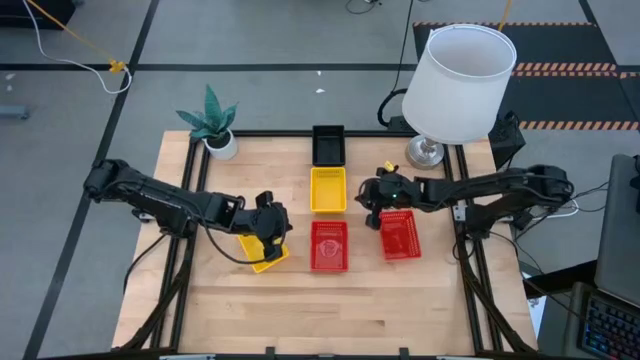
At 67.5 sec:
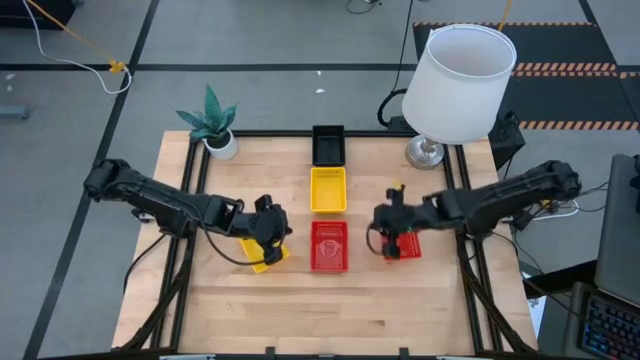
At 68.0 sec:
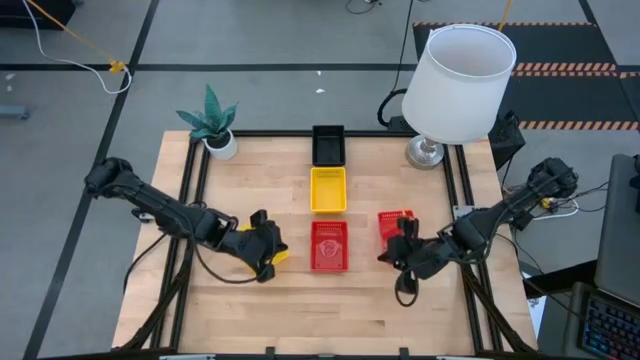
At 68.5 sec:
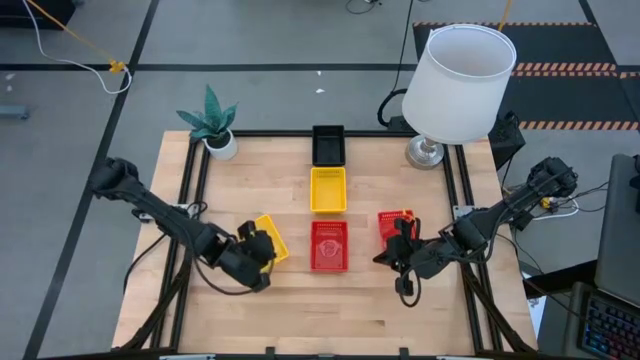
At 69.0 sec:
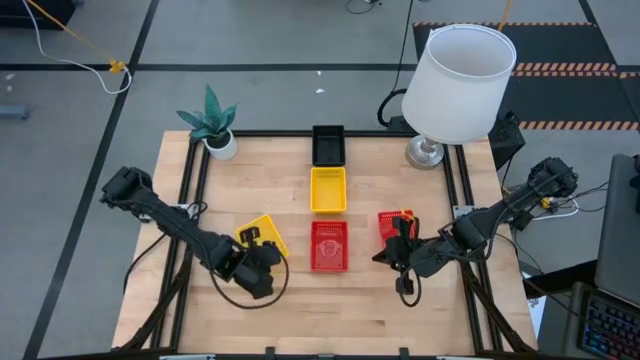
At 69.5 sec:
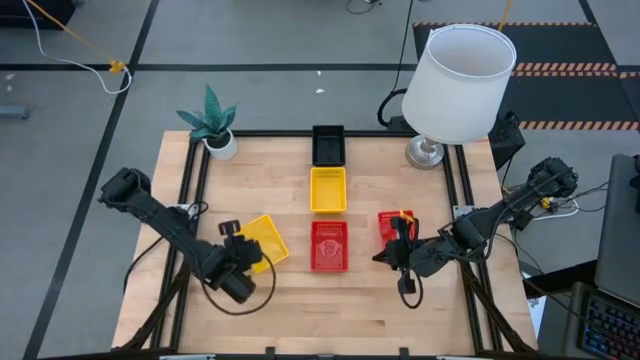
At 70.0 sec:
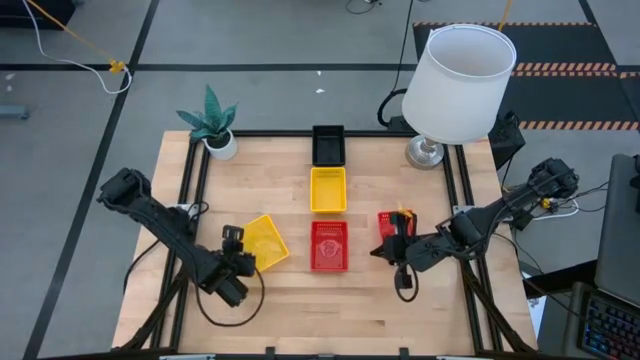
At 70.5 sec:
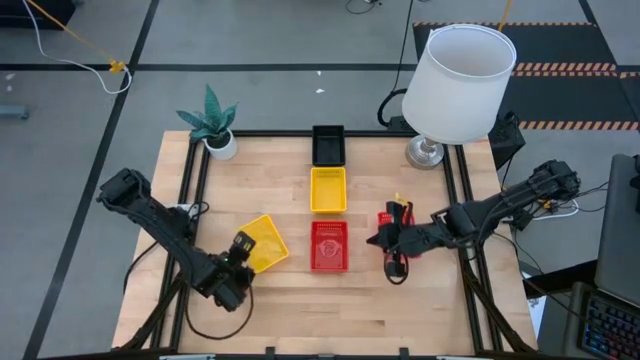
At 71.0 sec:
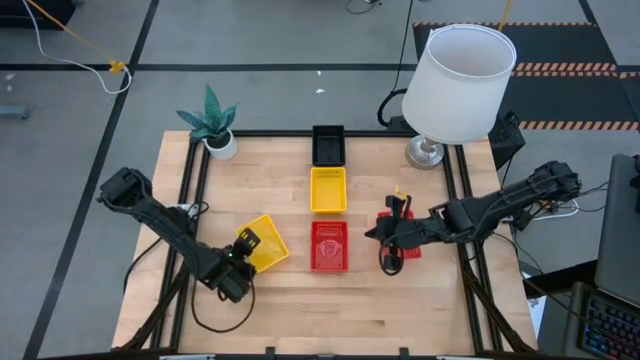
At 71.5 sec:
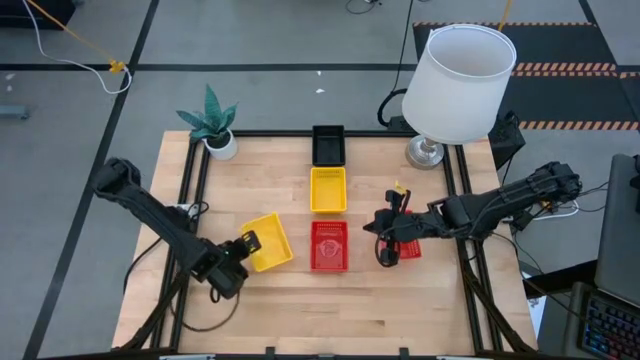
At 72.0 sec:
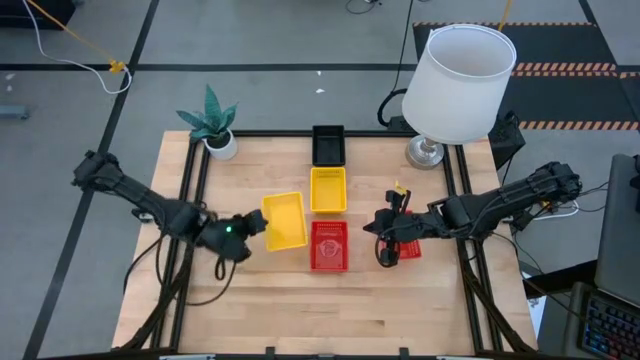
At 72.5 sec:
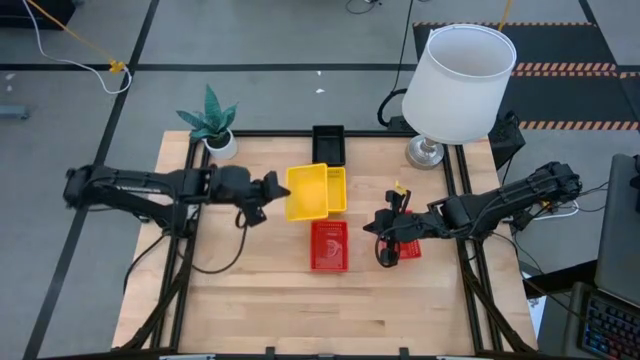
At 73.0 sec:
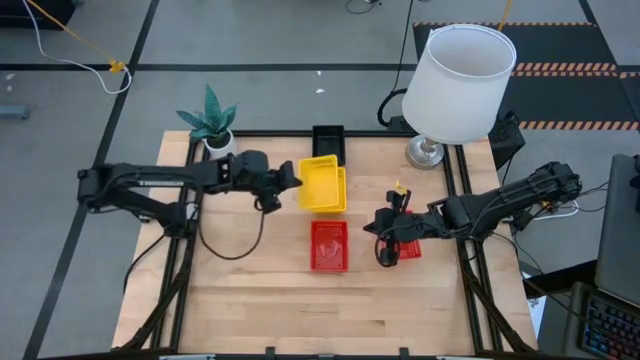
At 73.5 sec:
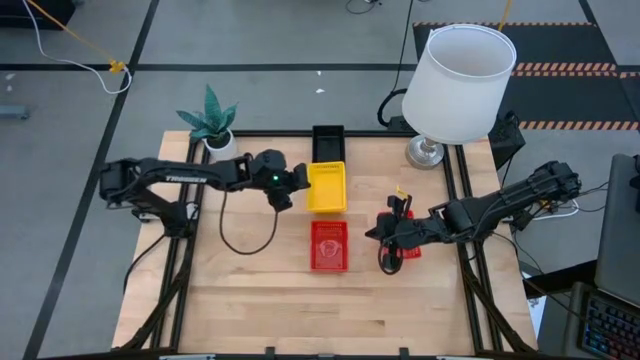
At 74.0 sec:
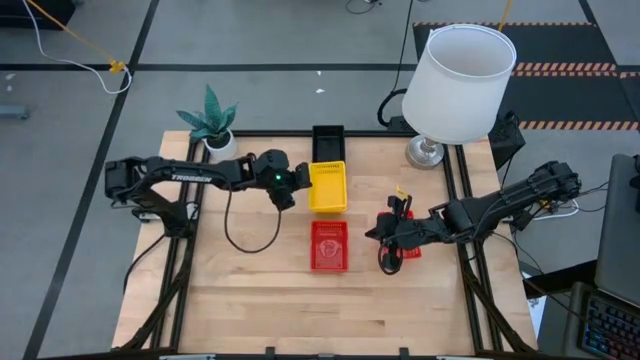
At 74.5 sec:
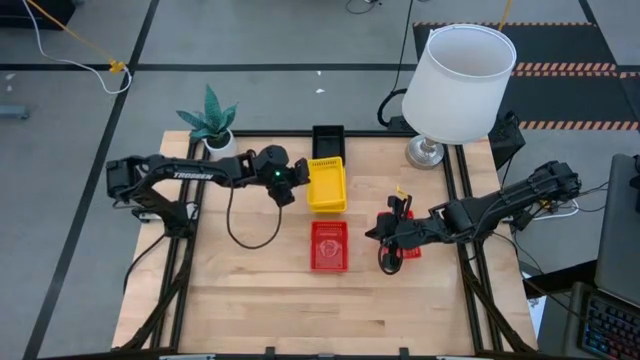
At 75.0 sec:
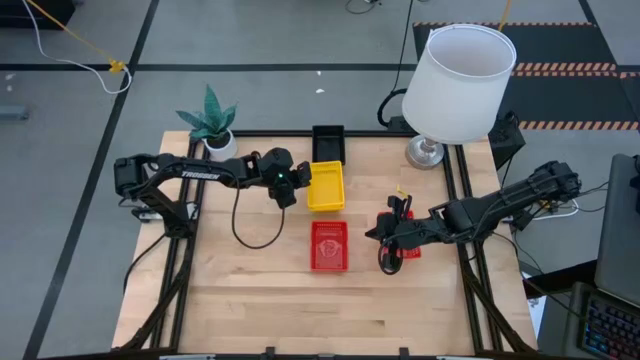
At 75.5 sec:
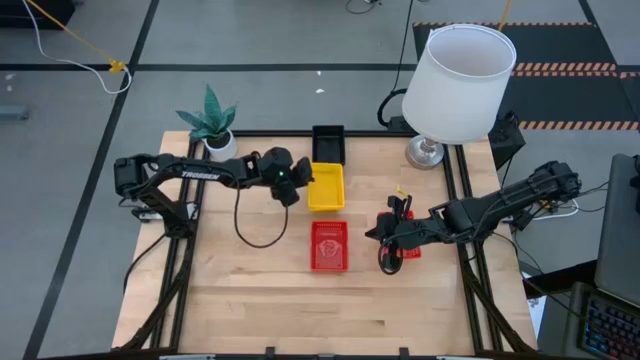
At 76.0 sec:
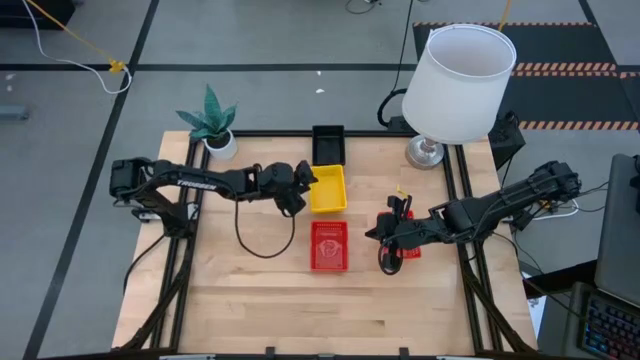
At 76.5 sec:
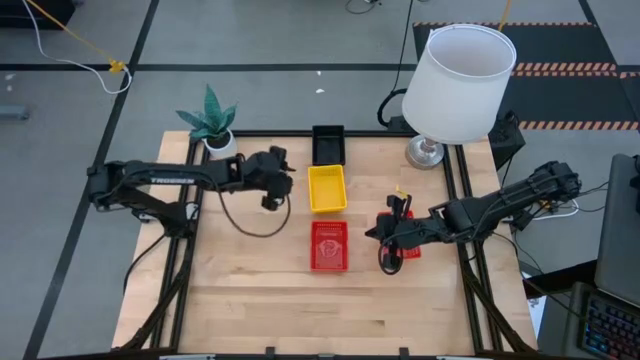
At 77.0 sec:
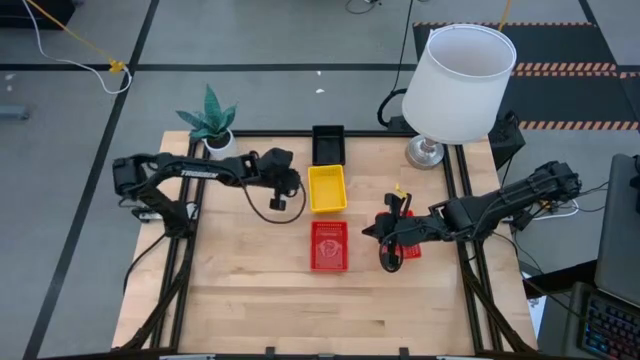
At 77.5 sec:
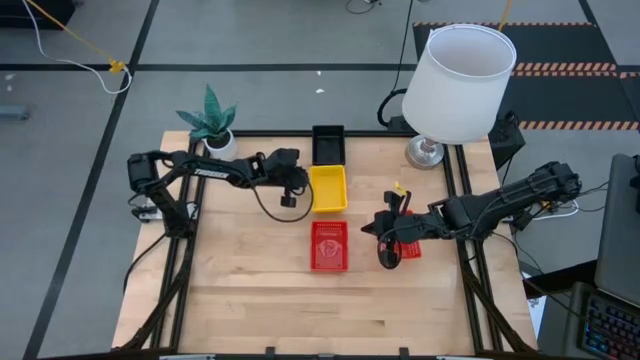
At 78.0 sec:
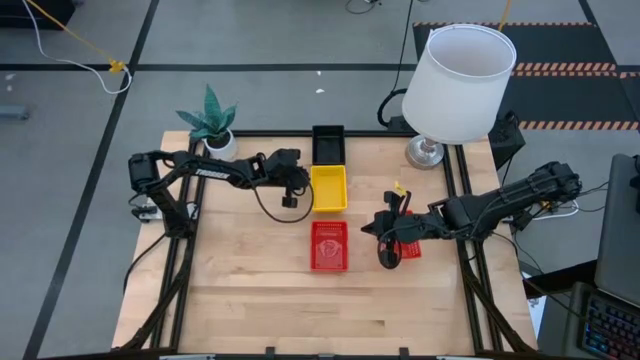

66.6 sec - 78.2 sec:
Stack the bottom yellow bin on top of the top yellow bin

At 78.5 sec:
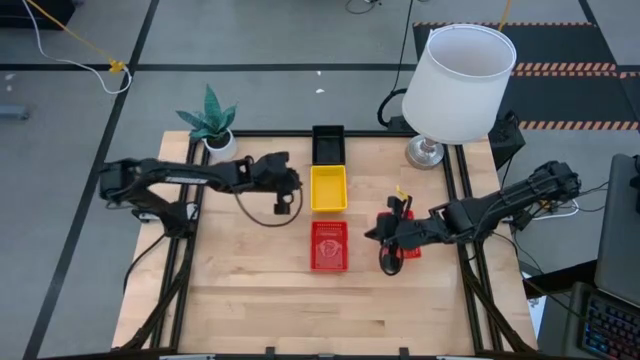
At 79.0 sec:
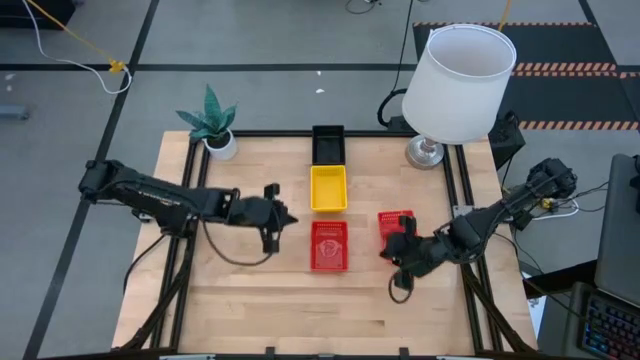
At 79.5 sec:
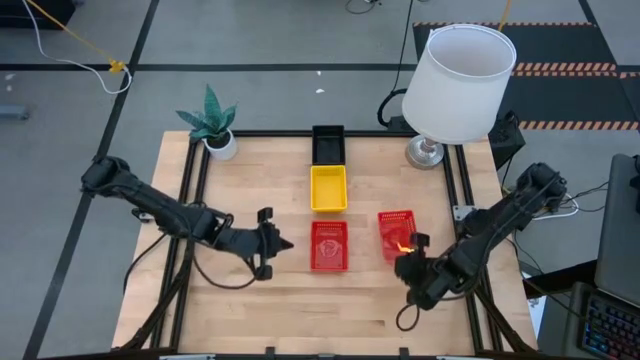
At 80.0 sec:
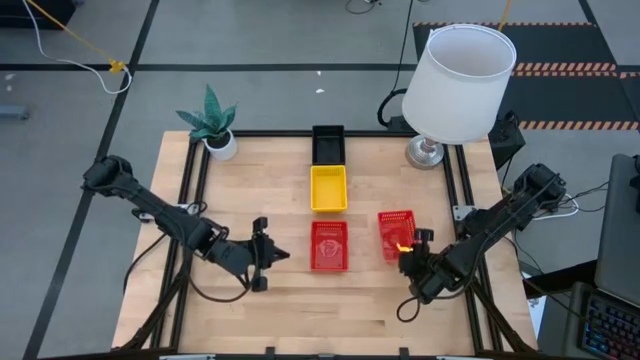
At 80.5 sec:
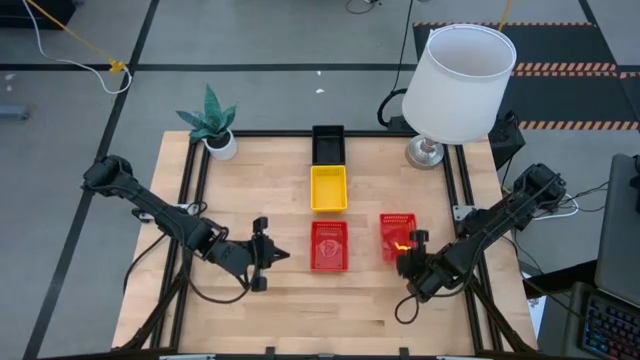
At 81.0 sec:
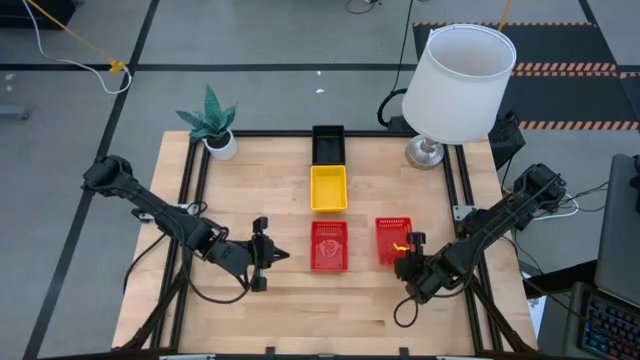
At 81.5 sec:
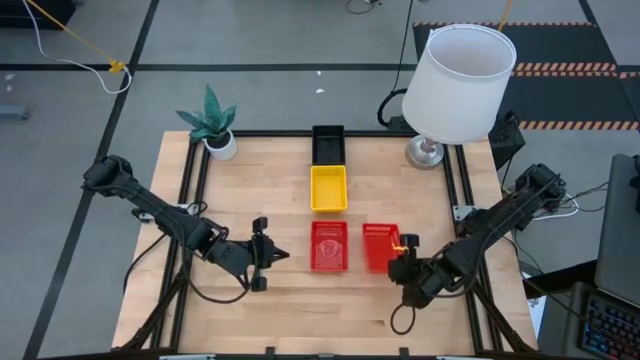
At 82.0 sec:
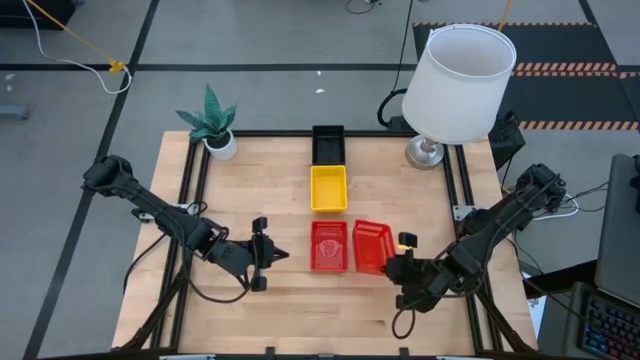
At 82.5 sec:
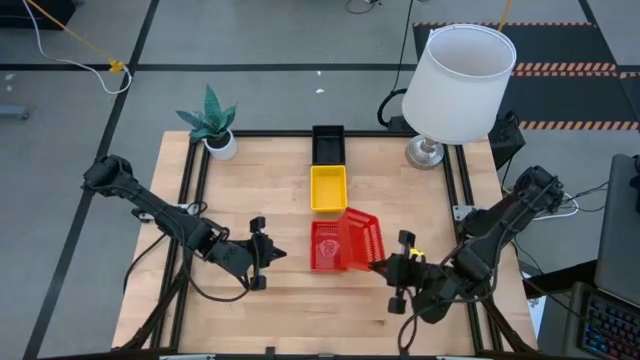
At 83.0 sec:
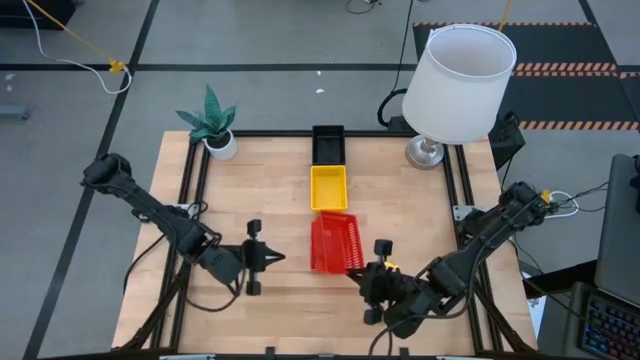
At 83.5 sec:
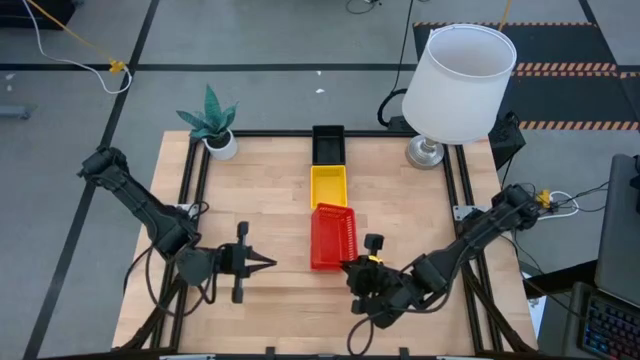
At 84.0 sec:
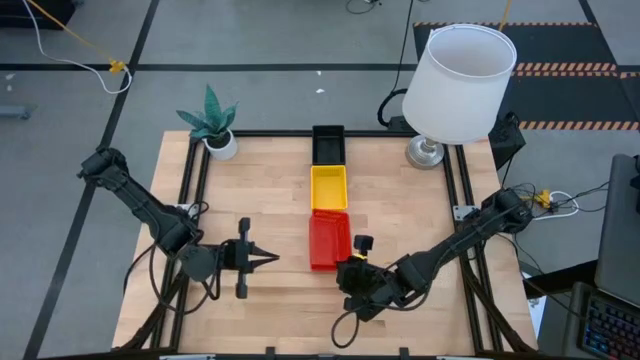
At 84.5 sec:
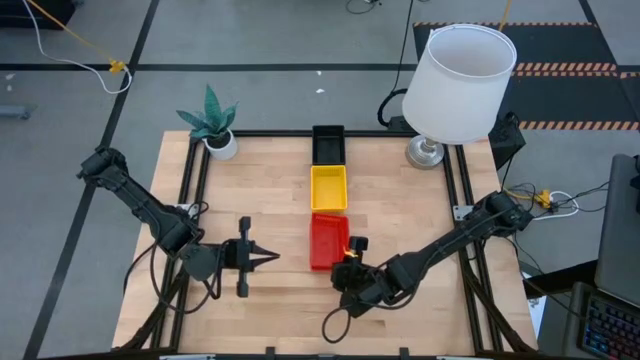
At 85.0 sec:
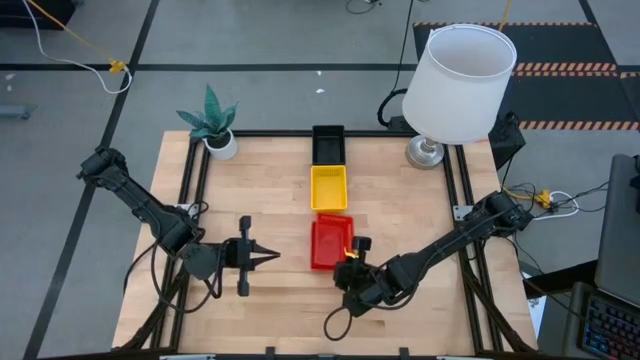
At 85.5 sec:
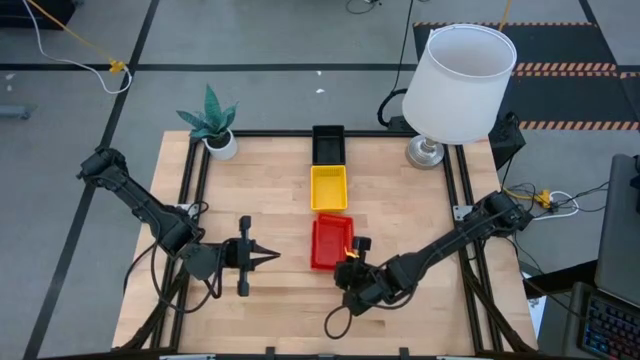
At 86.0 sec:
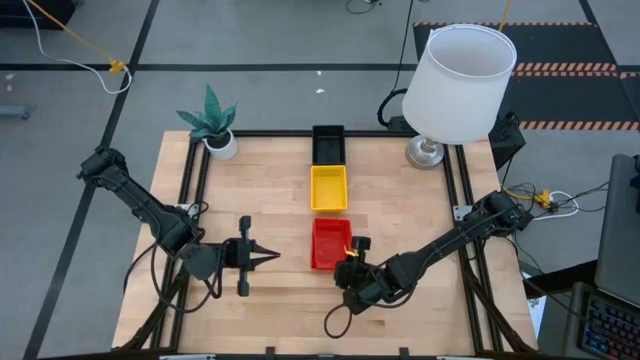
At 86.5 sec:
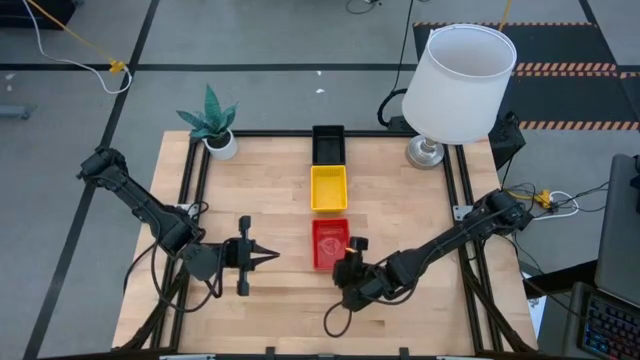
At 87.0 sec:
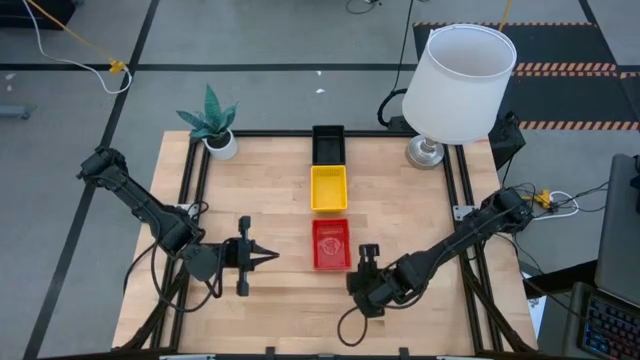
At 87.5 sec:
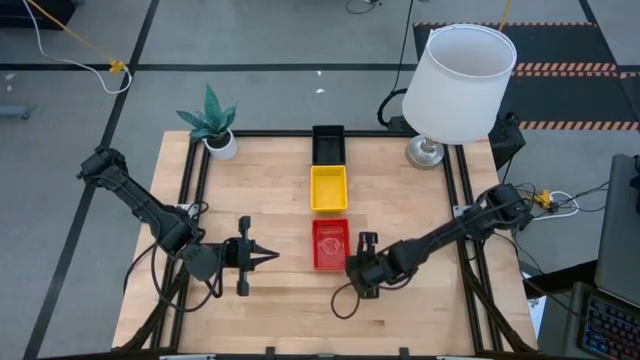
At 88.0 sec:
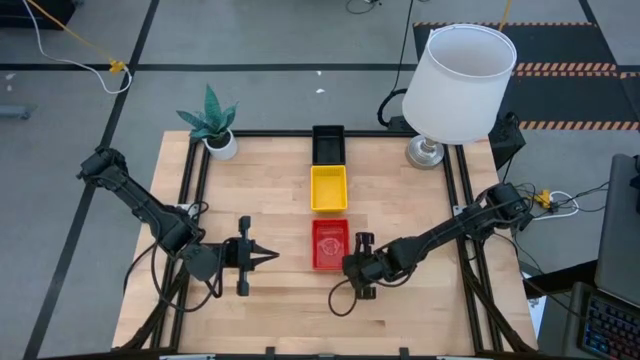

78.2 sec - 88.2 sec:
Stack the right red bin on top of the left red bin
